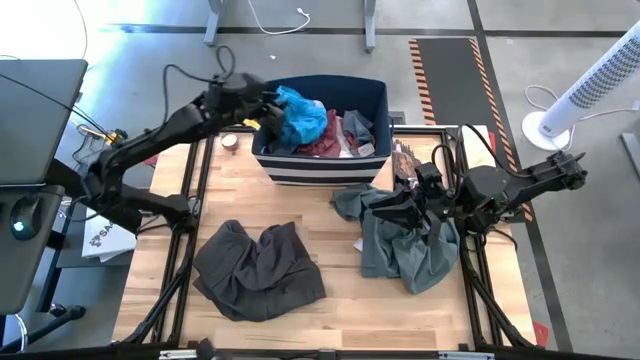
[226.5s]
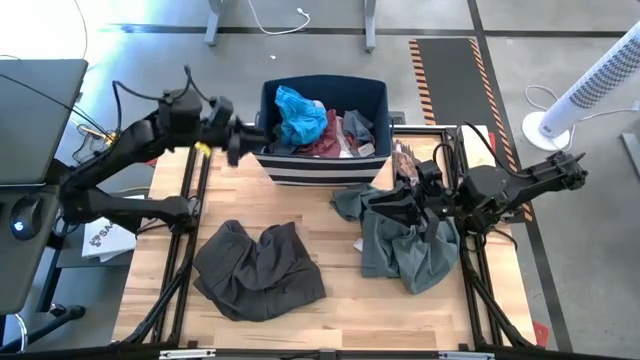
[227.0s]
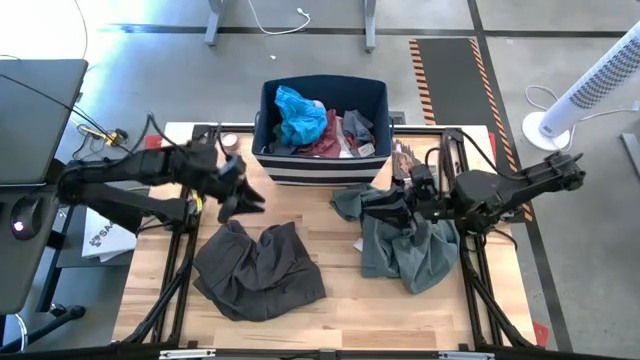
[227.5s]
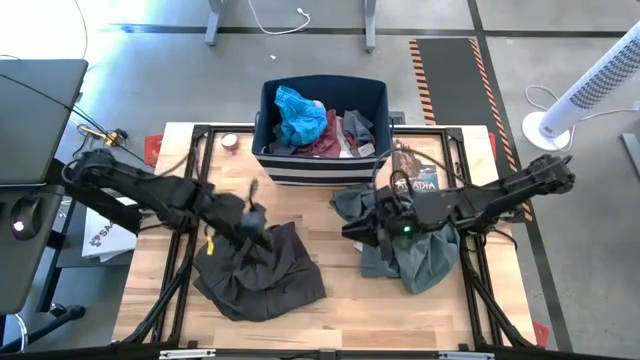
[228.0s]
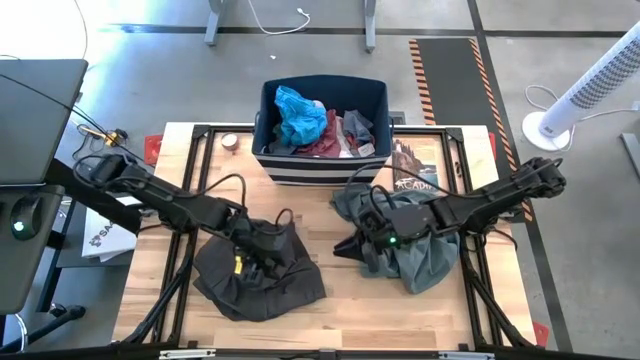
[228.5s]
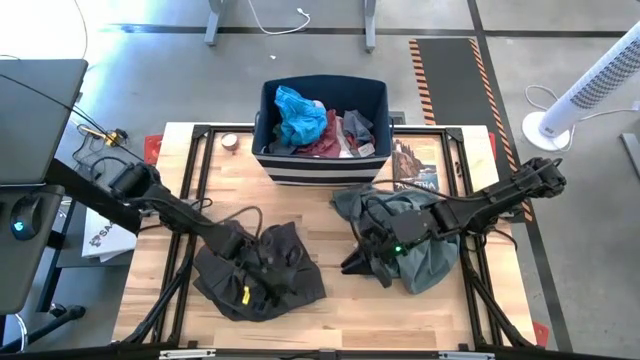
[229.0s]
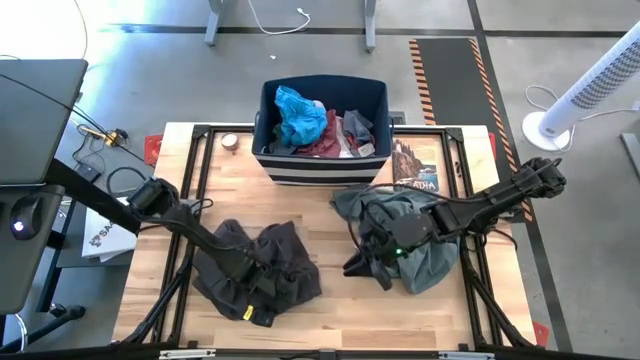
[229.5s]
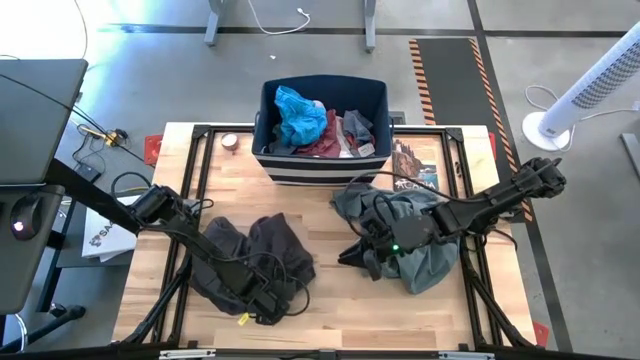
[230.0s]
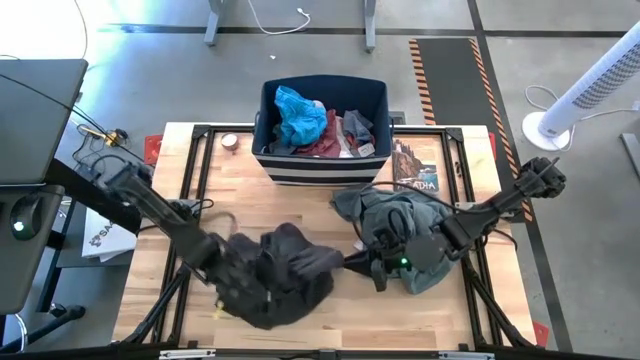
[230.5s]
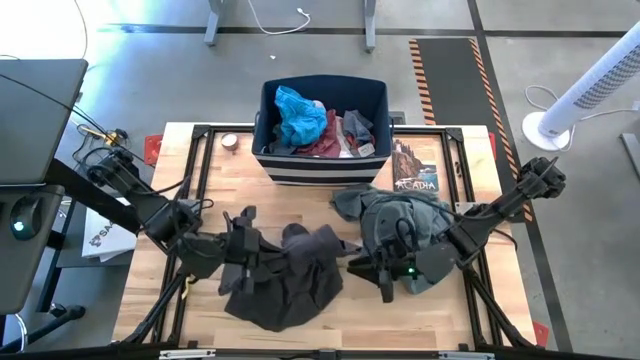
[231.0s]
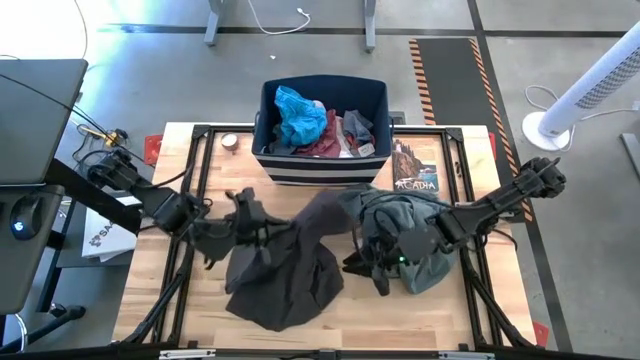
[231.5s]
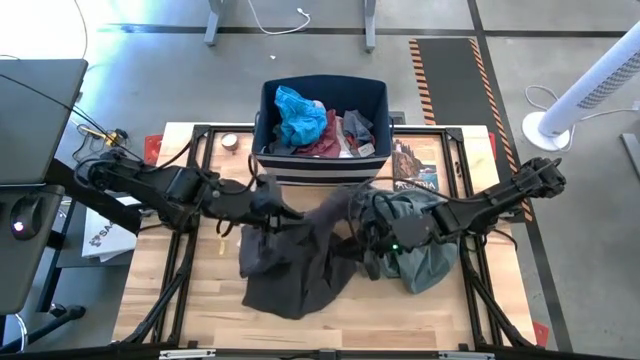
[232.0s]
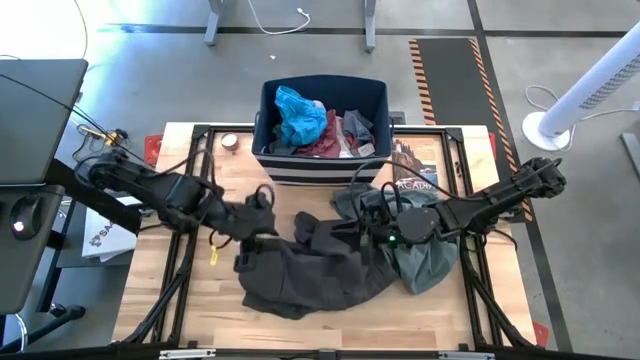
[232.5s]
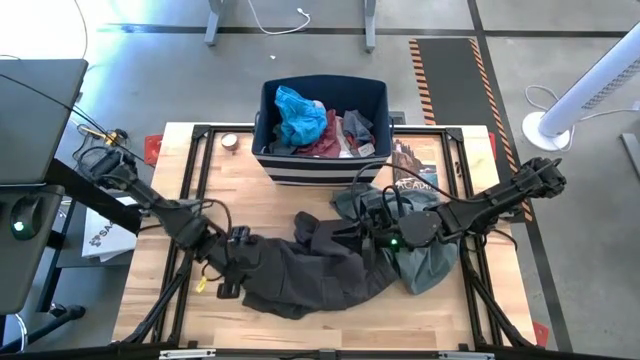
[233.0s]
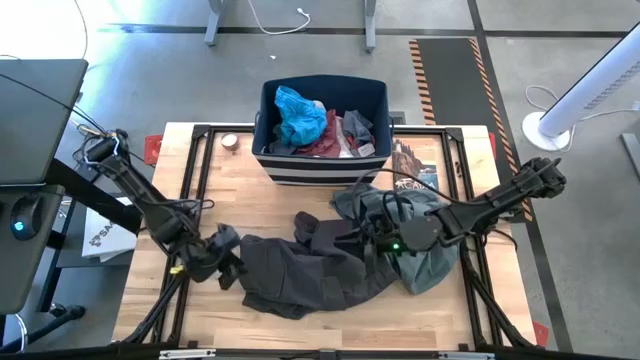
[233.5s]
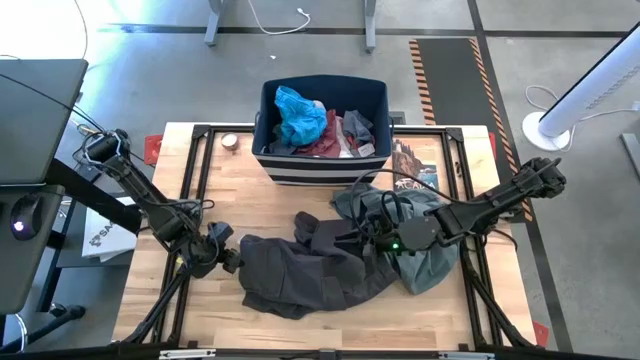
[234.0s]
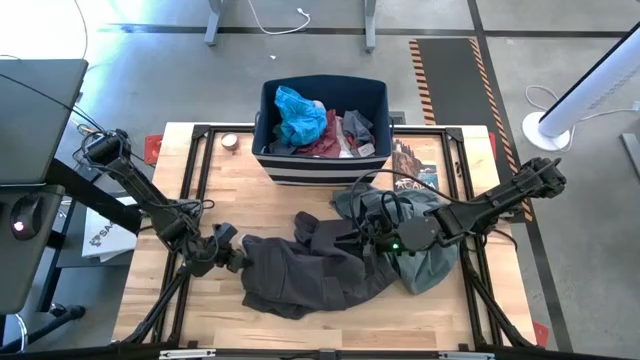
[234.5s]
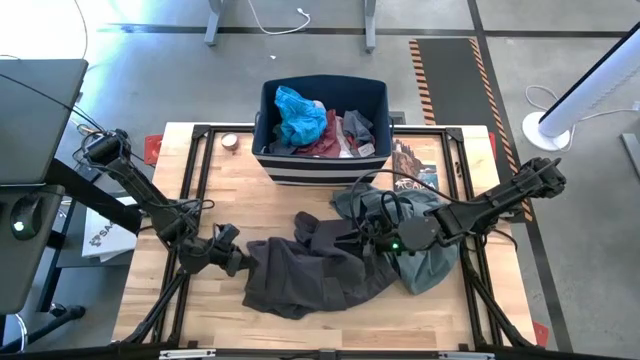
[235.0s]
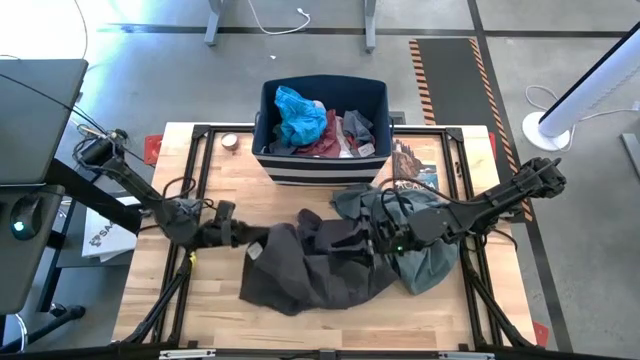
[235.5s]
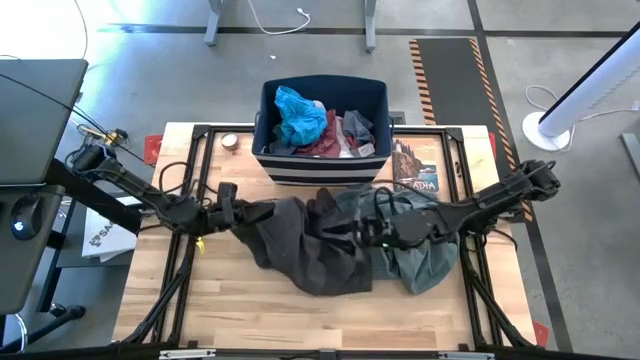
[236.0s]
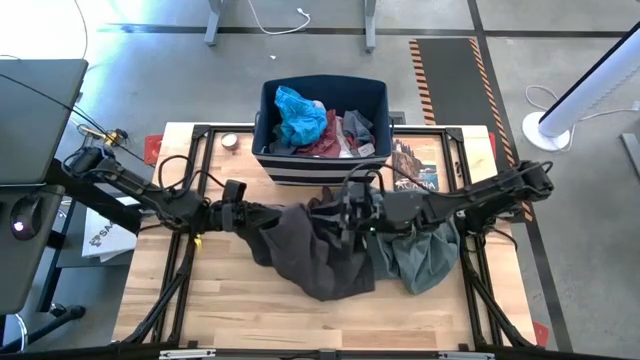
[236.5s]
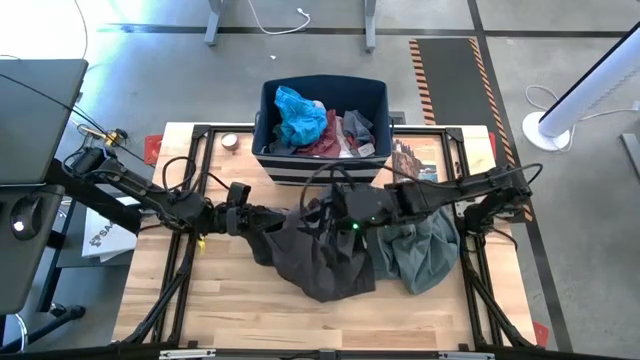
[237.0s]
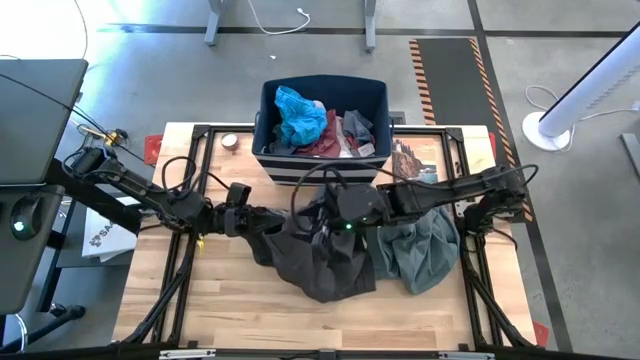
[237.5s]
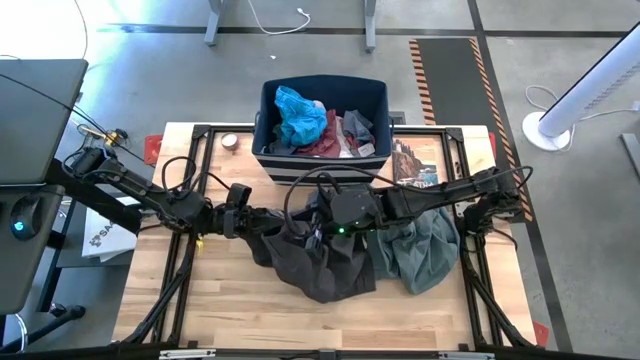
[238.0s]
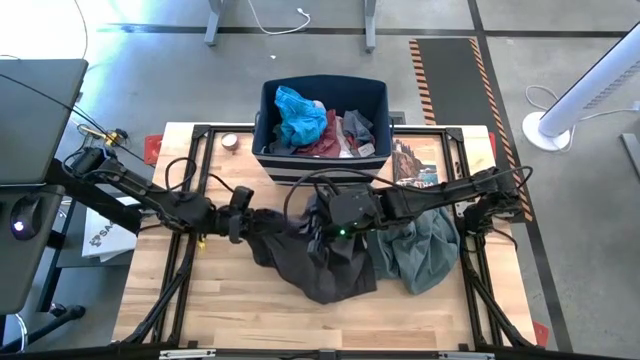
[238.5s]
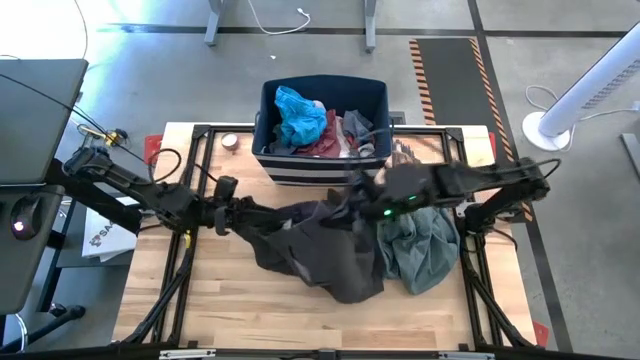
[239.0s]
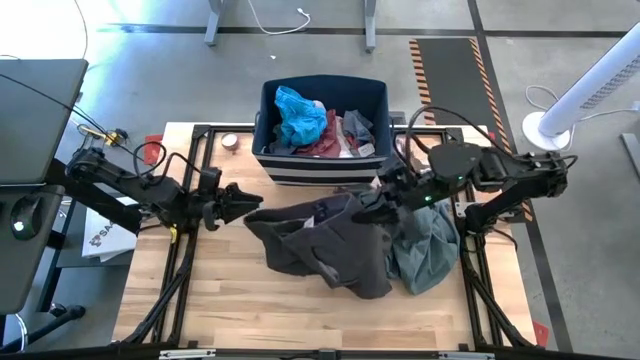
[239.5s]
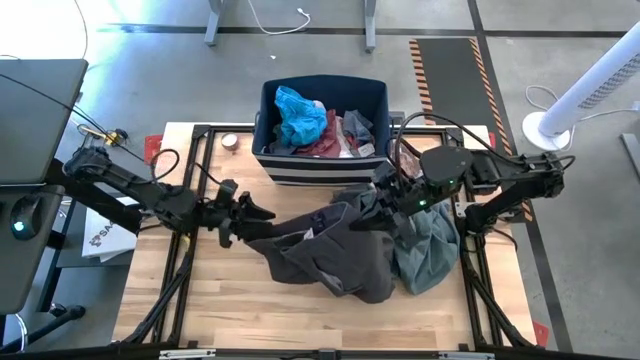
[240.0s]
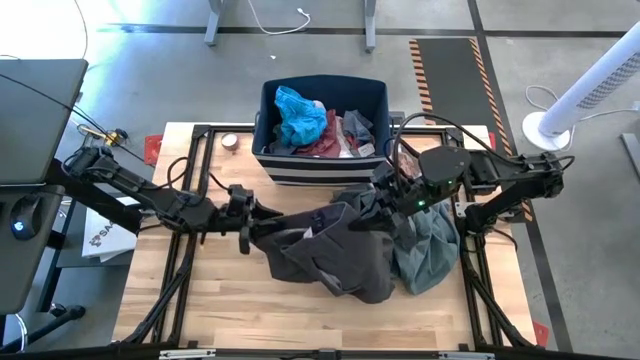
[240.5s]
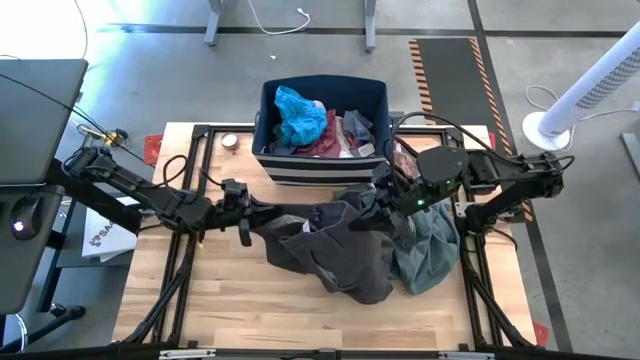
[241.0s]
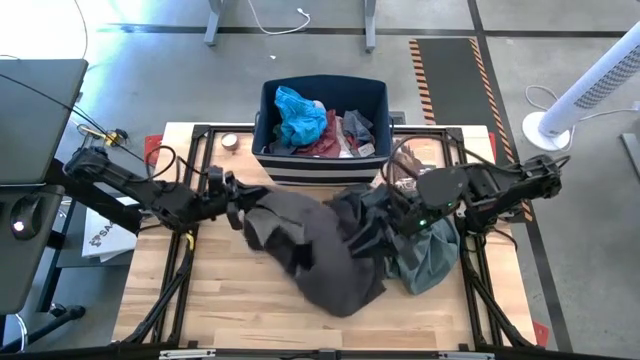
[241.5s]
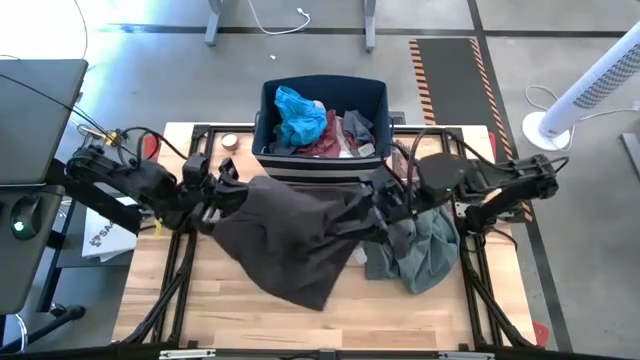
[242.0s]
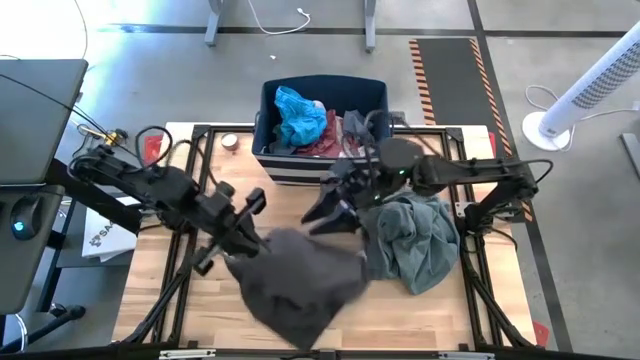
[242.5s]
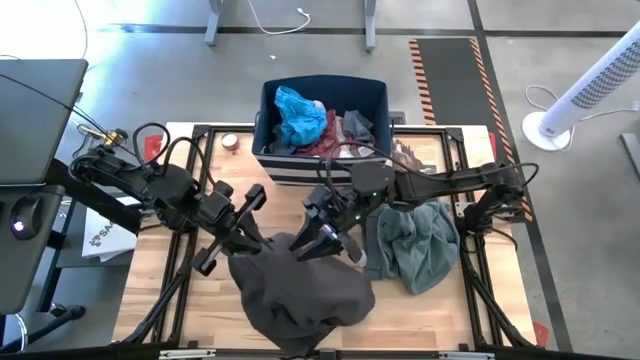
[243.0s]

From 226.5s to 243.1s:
Task: Sort clothes
Fold the dark grey short

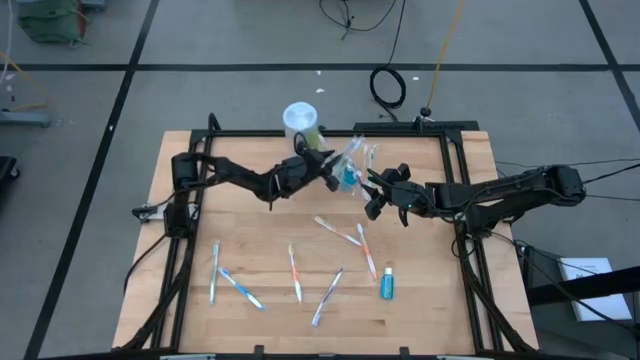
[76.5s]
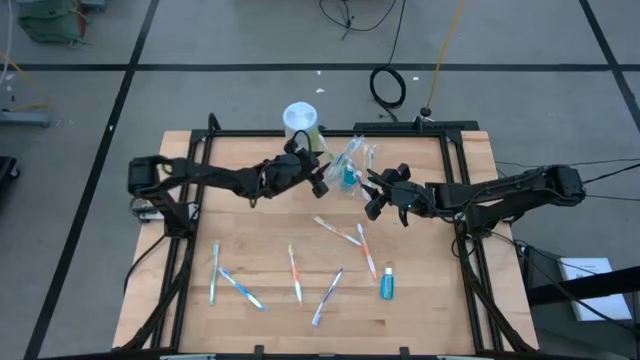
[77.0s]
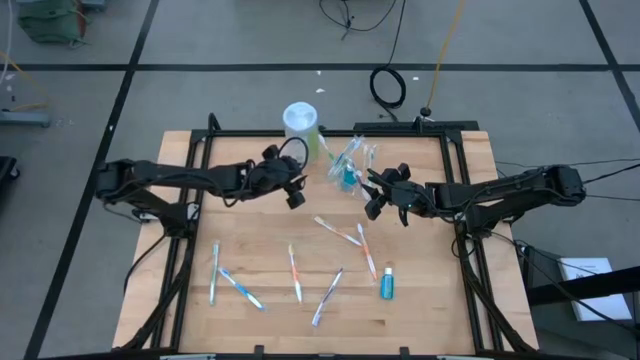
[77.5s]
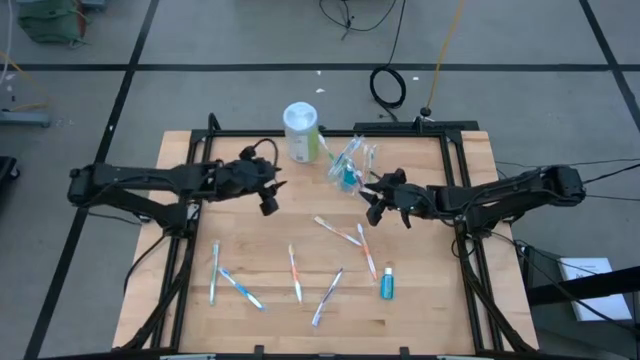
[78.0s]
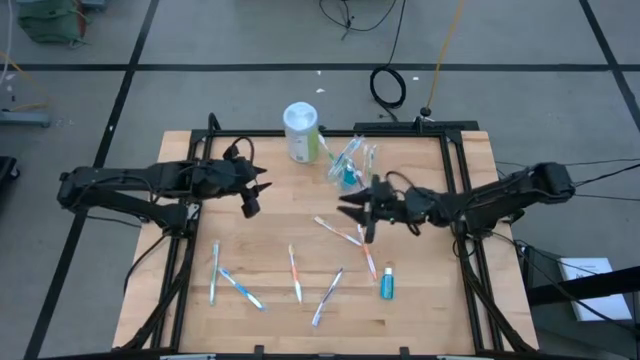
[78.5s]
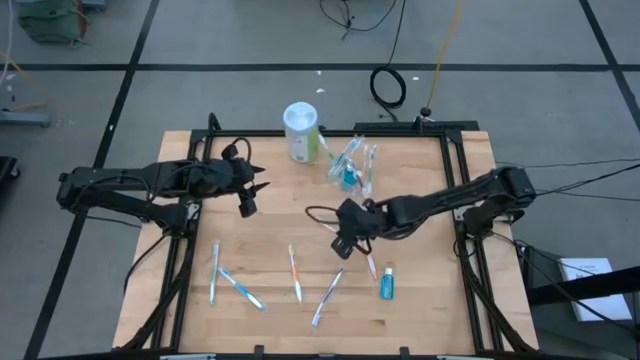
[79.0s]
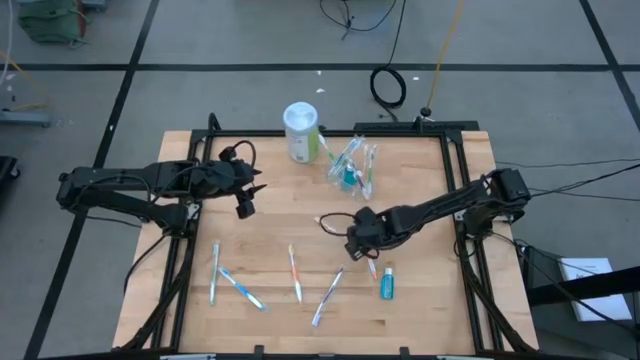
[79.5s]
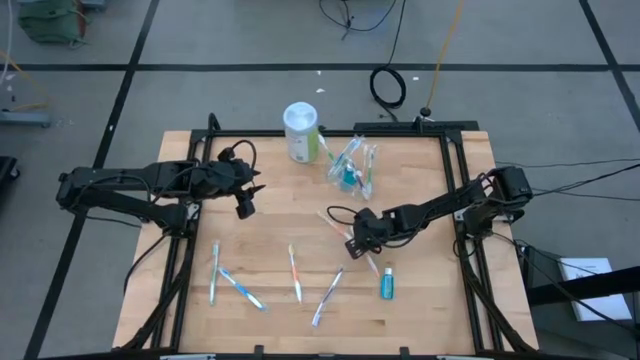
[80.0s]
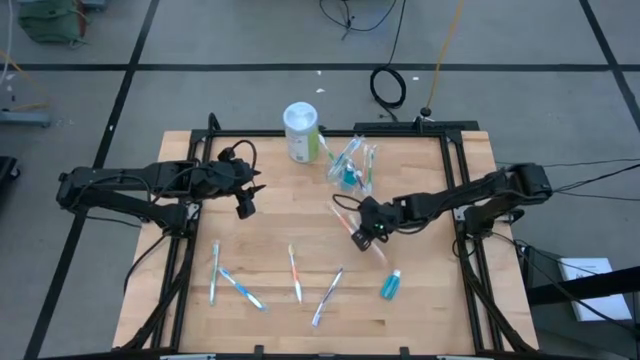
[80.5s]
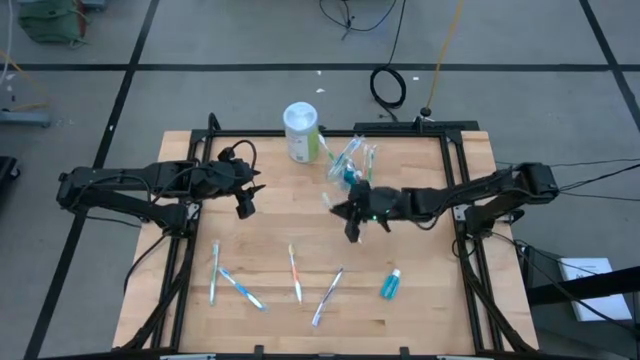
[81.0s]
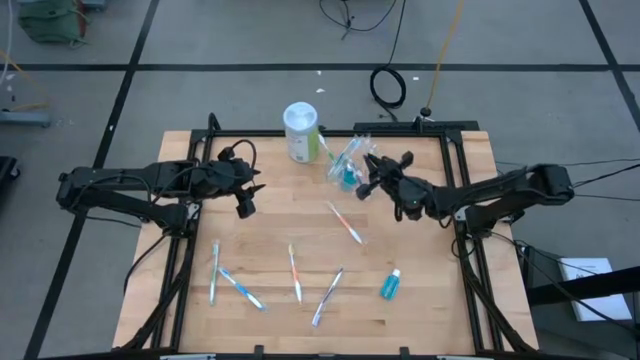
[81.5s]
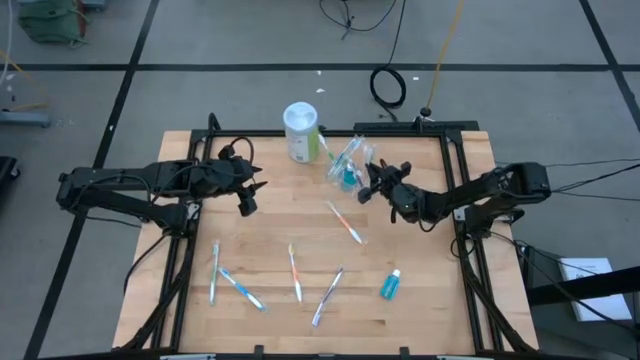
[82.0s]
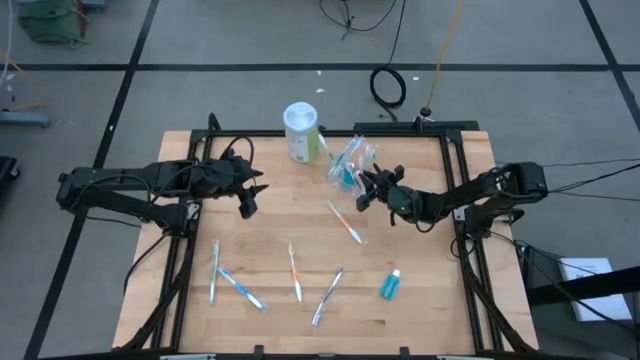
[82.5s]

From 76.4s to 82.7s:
Task: Pick & Place toothbrushing station
Put the orange toothbrush into the transparent organizer
